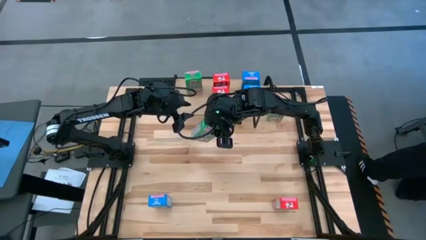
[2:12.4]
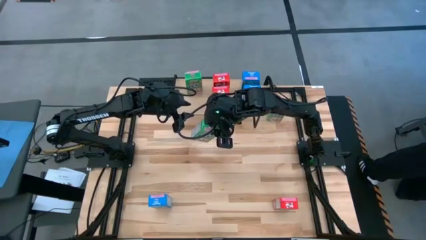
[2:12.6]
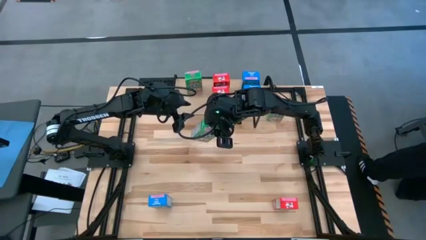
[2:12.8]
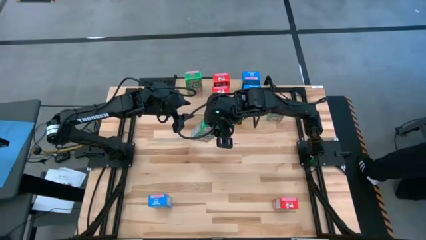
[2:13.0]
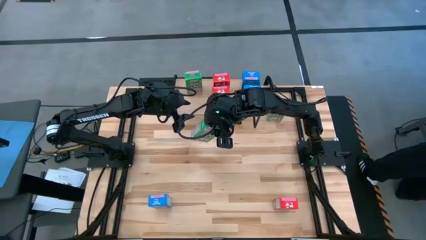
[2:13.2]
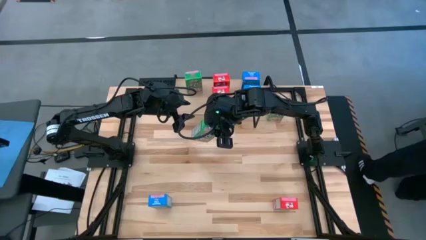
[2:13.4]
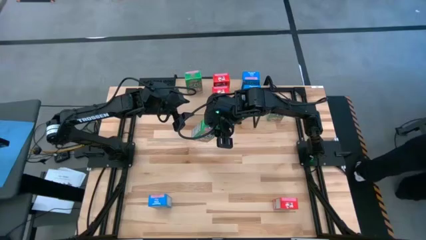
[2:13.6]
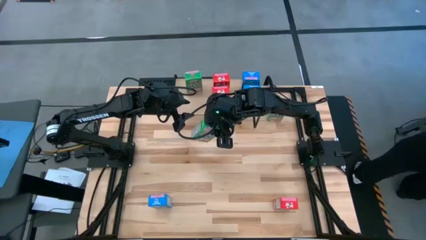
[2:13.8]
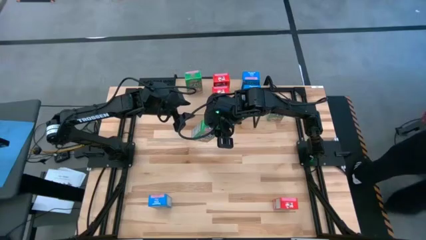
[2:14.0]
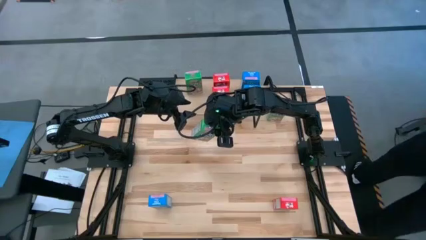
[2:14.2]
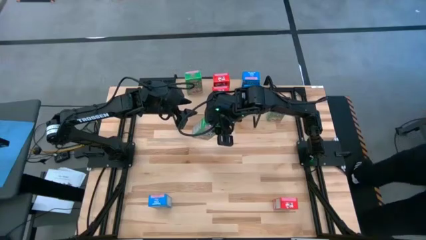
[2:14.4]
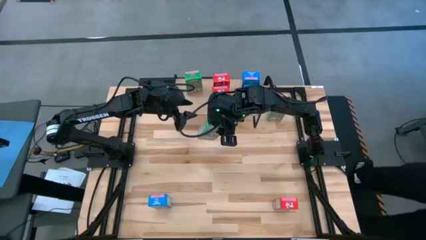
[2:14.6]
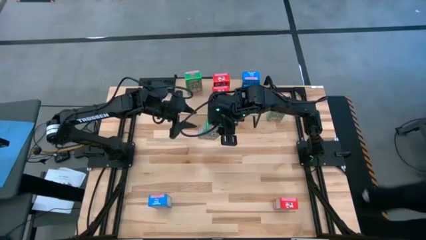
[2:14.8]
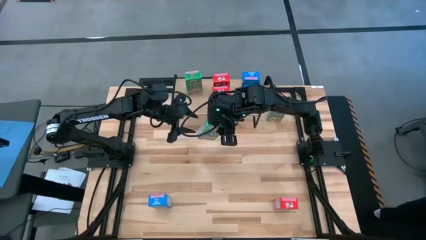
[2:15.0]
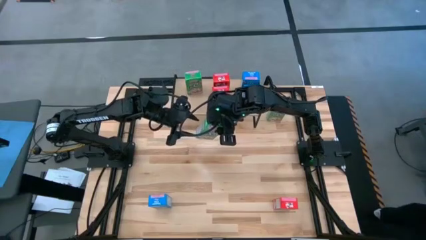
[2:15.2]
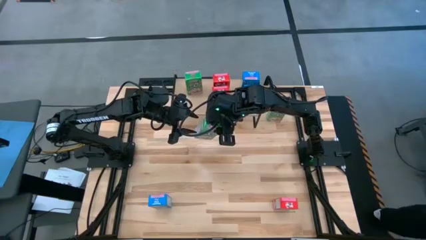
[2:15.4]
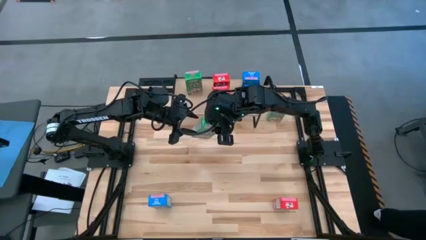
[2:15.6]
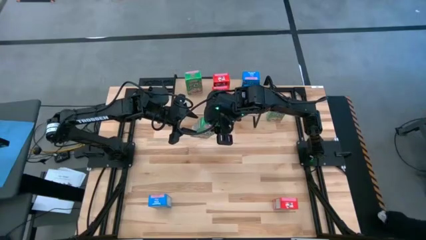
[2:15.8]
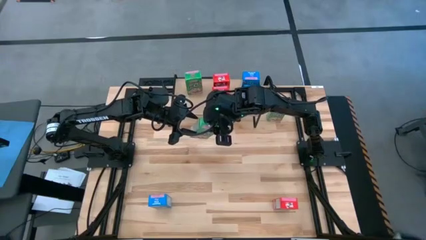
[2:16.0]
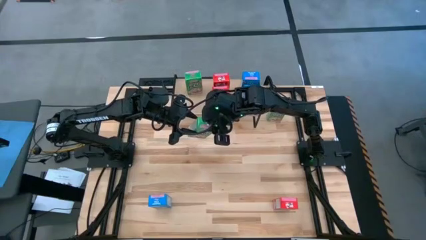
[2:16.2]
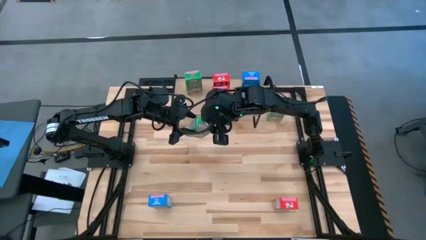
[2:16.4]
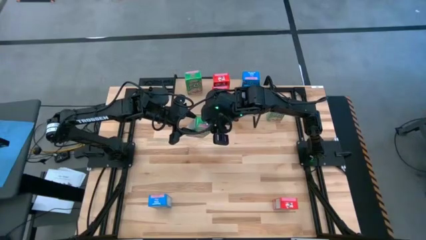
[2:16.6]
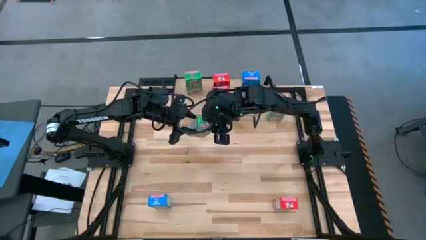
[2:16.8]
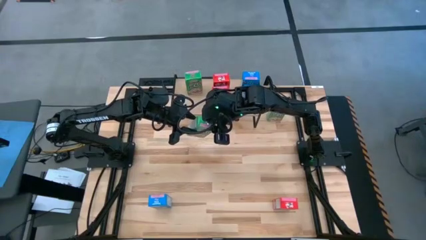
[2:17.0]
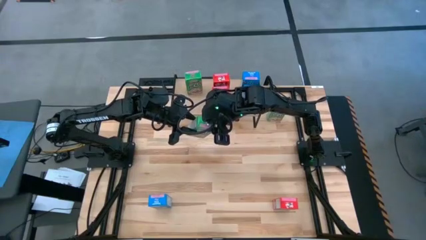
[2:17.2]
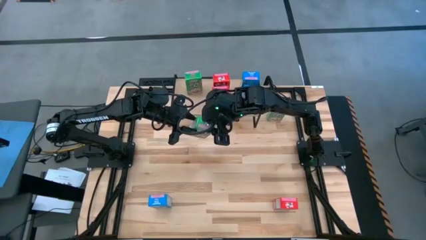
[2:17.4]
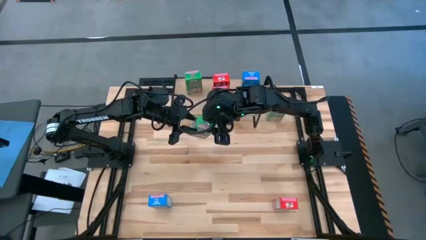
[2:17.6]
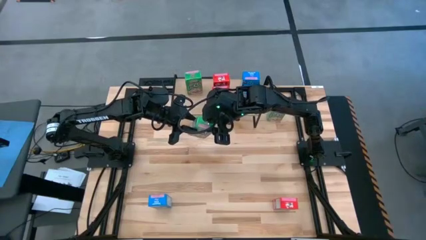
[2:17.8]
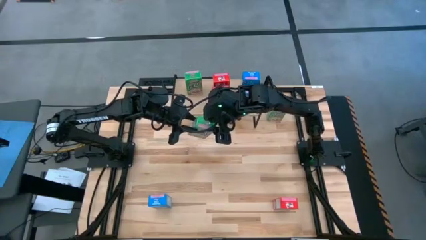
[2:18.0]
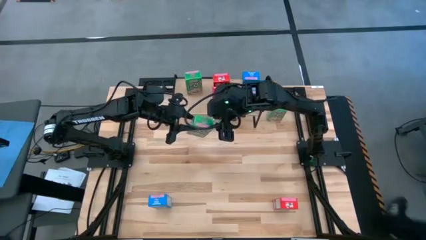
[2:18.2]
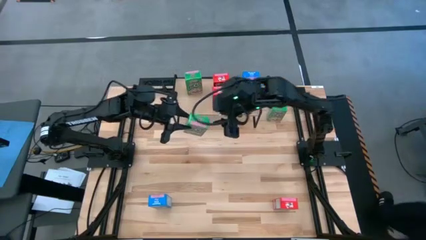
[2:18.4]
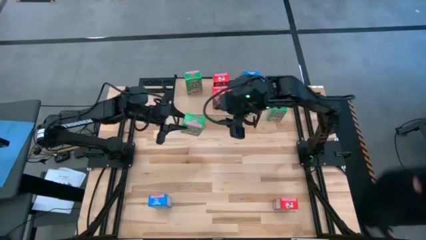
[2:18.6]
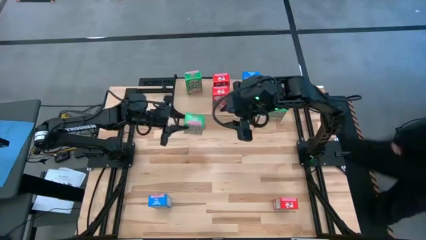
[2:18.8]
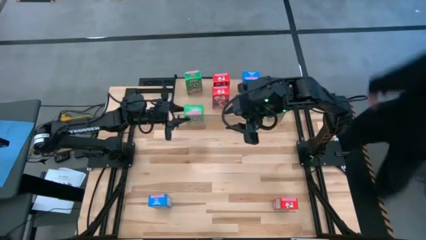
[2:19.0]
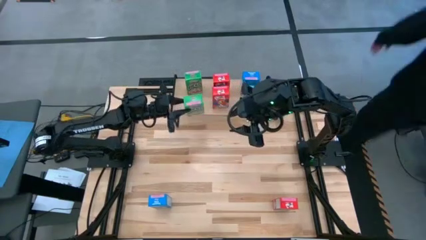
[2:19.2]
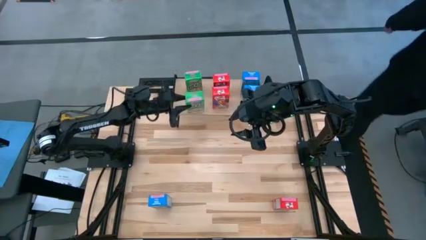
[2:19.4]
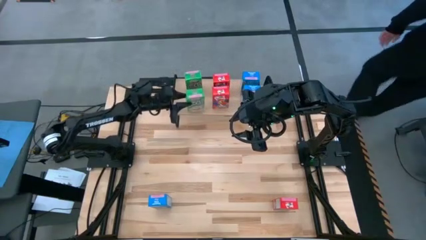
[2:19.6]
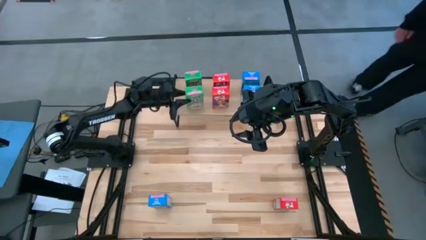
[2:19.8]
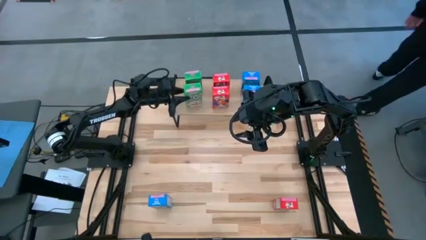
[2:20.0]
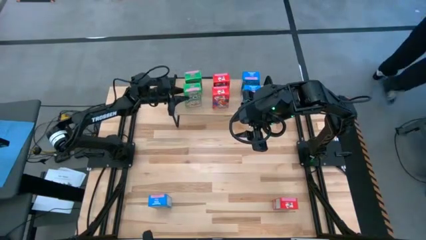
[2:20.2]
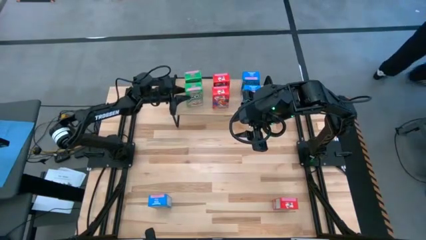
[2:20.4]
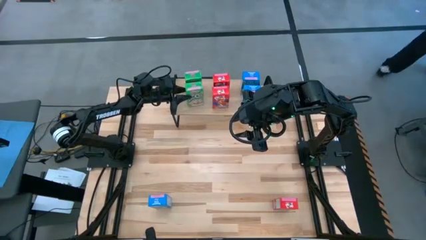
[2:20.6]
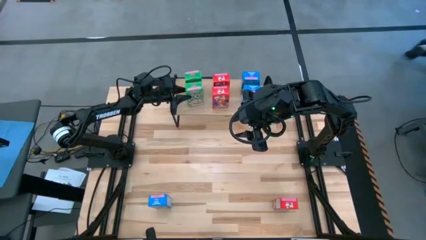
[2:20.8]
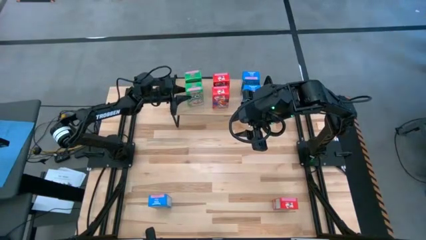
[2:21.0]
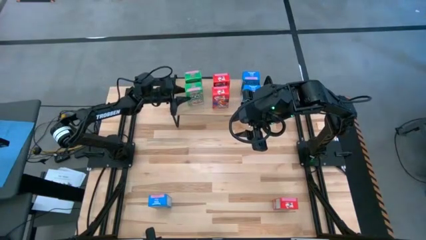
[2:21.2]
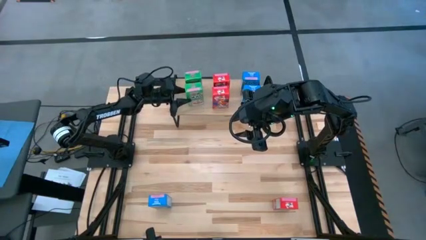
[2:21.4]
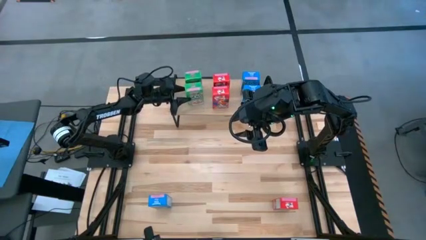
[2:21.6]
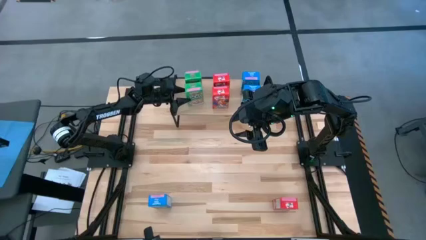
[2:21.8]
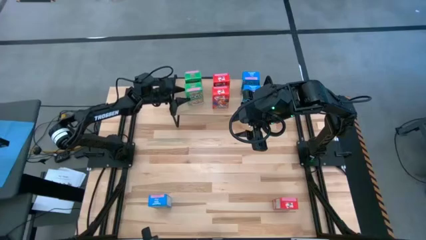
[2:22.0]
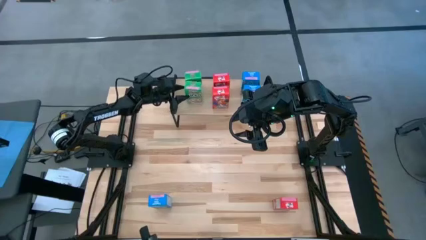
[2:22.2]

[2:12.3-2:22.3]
Task: Stack cereal on shelf
Put the bottom green cereal box on the shelf aligned with the other green cereal box

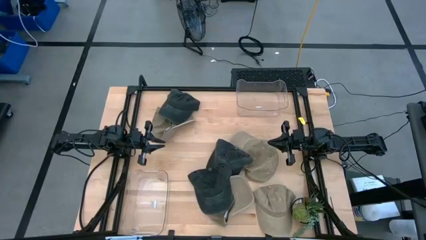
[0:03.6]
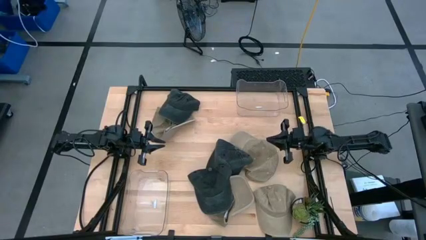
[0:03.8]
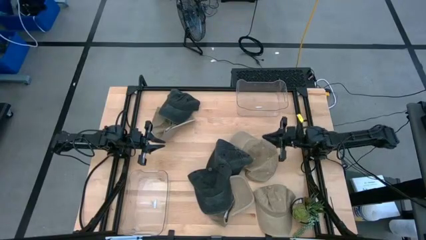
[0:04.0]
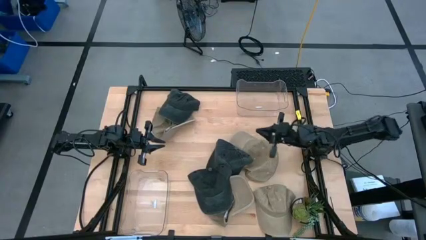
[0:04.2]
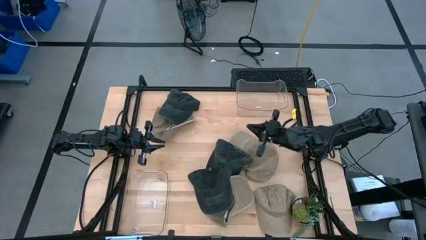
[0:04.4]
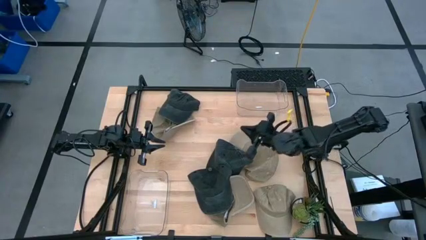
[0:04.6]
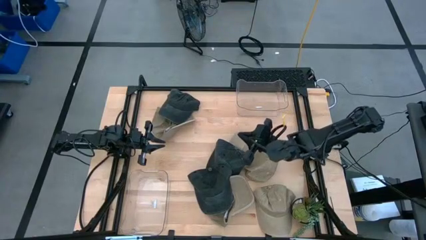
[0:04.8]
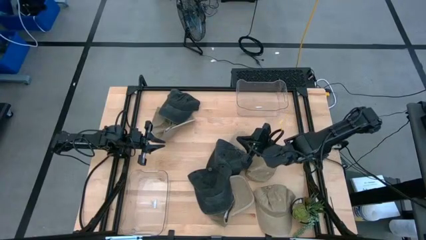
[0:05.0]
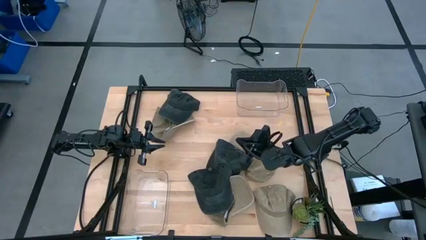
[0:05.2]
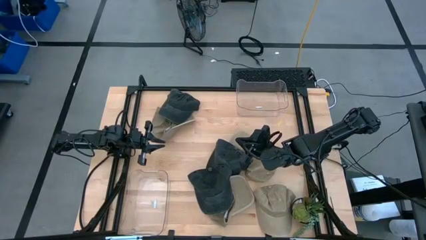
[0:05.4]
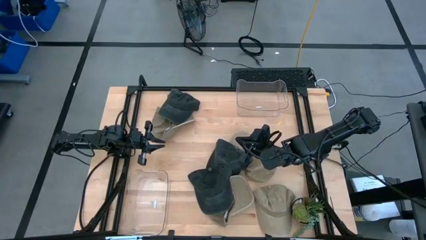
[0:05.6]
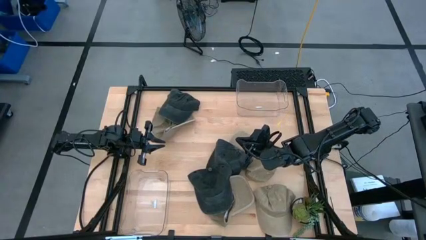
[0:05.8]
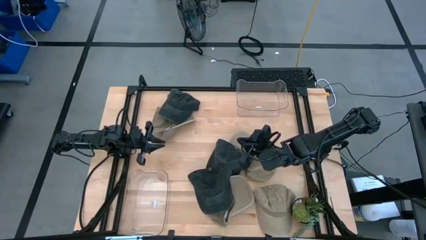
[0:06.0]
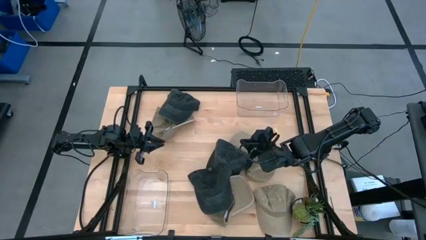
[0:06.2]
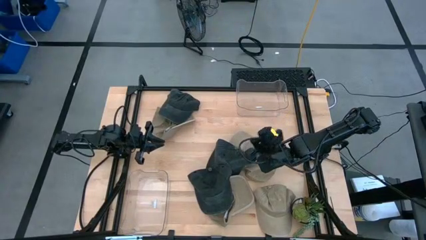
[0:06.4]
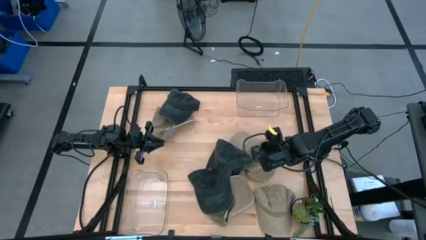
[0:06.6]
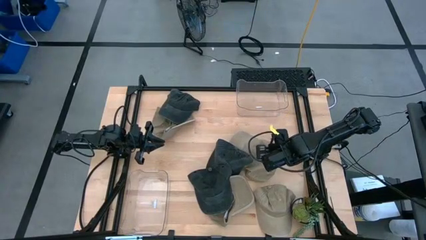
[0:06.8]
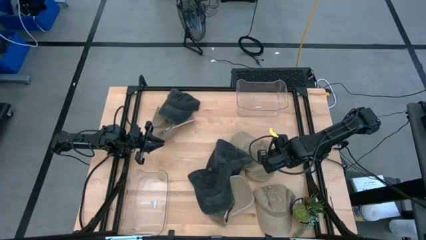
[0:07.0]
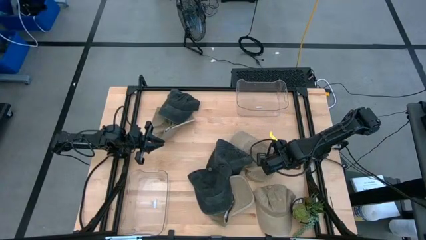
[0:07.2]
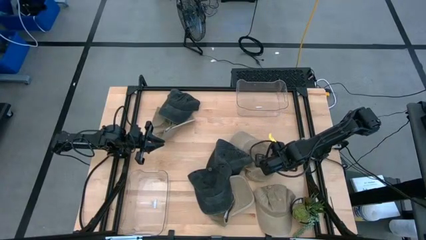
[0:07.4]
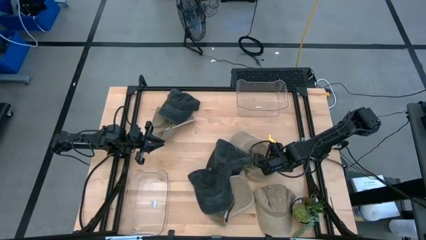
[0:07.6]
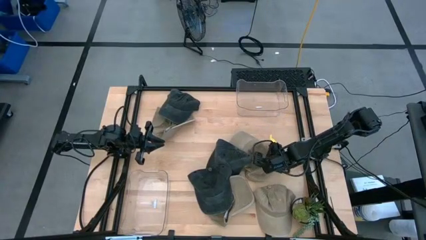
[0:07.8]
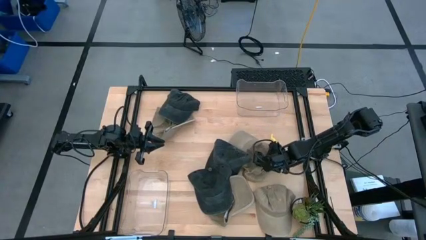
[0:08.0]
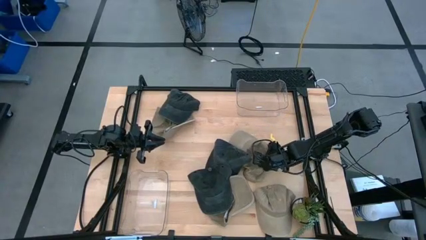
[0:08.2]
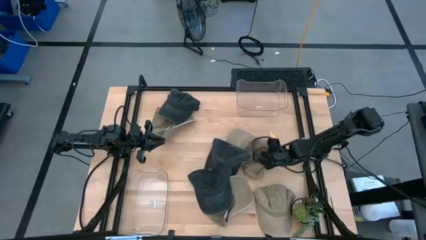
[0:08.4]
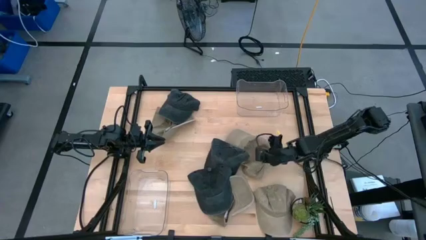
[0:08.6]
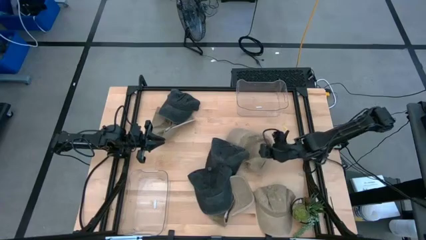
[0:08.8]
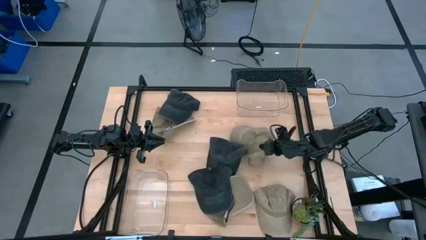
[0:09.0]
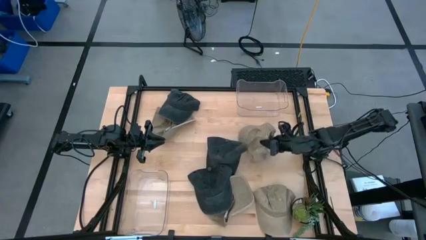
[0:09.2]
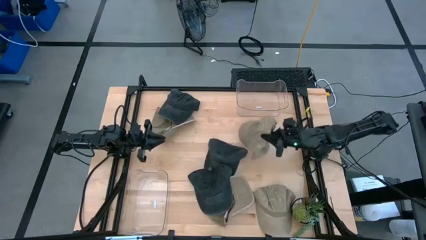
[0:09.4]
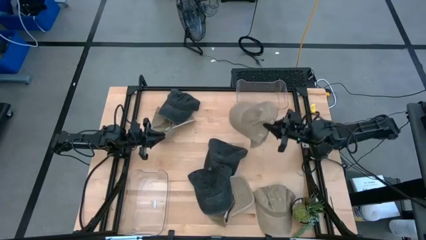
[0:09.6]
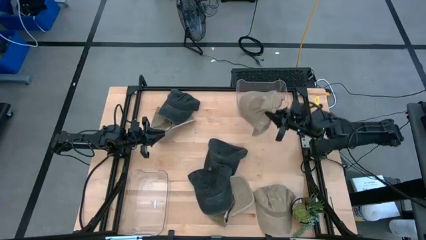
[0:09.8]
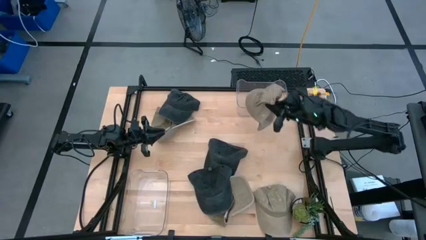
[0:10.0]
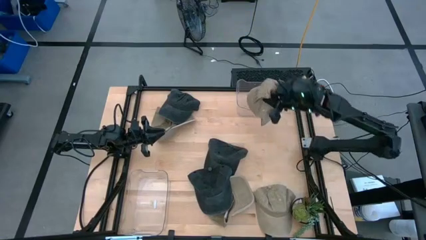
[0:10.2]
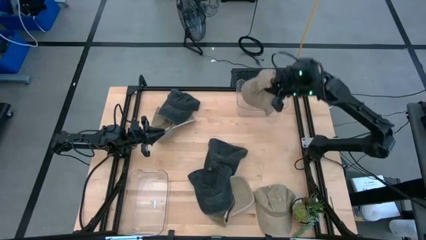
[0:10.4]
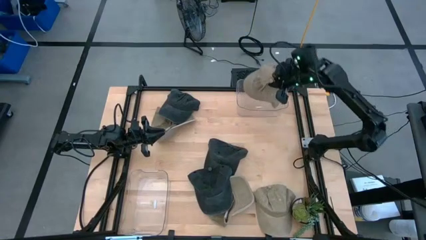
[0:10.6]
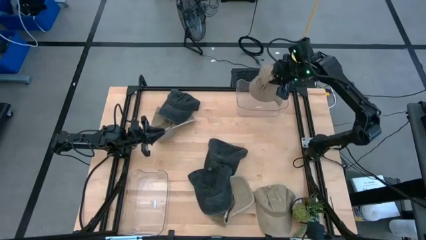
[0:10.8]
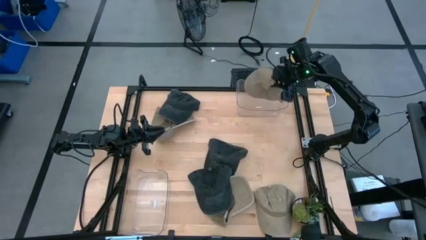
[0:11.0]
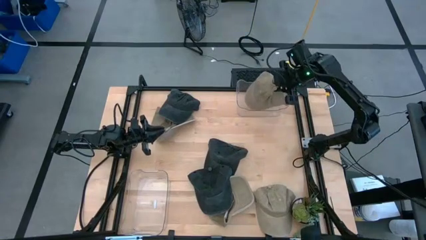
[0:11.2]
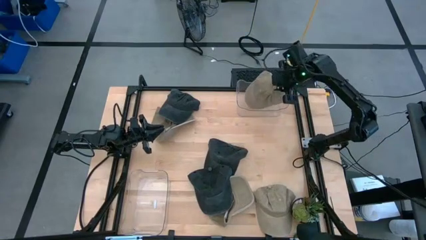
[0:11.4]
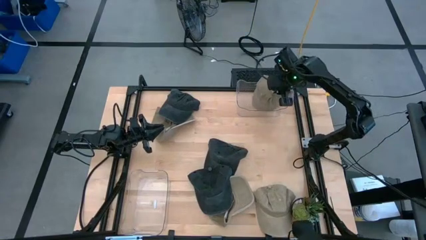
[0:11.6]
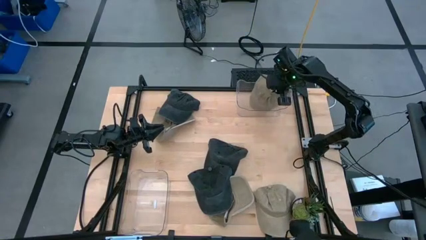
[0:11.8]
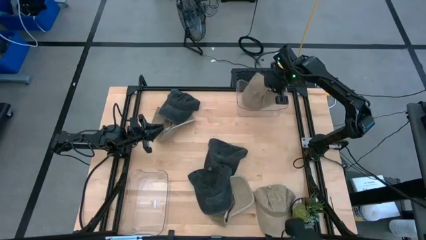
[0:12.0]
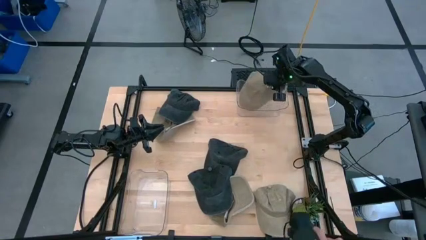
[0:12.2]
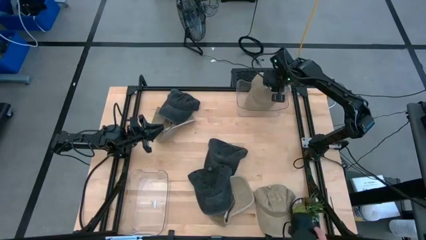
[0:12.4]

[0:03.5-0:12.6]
Task: Pick & Place hat
Put the brown cap into the top transparent bin
